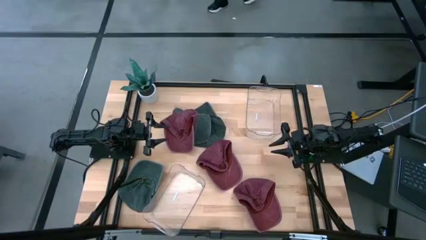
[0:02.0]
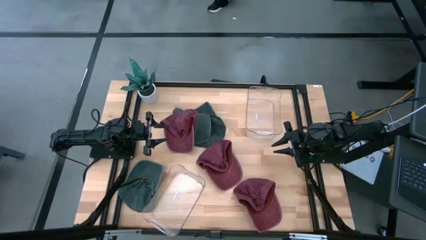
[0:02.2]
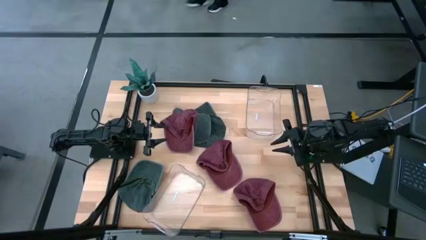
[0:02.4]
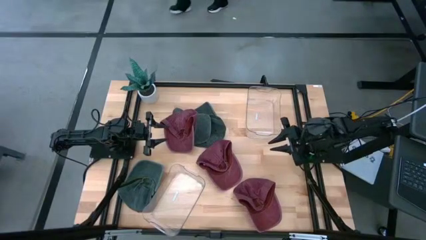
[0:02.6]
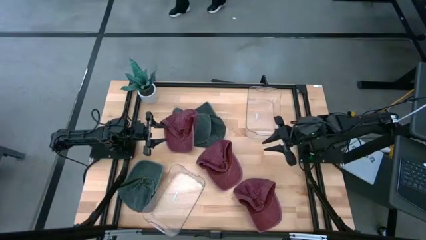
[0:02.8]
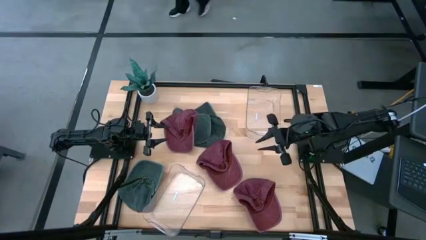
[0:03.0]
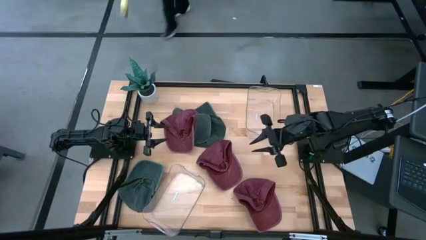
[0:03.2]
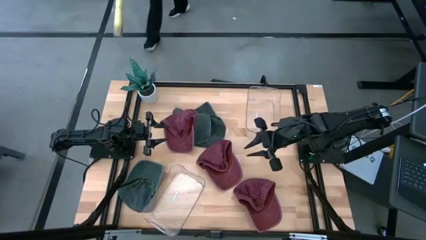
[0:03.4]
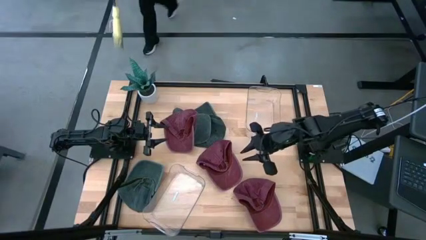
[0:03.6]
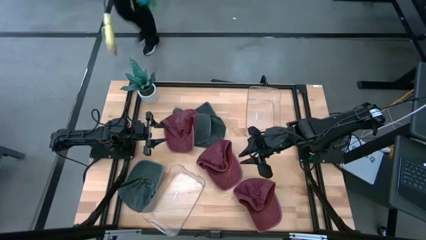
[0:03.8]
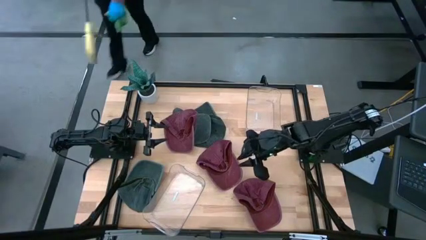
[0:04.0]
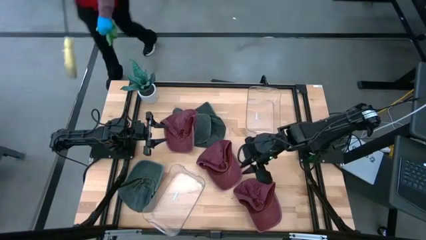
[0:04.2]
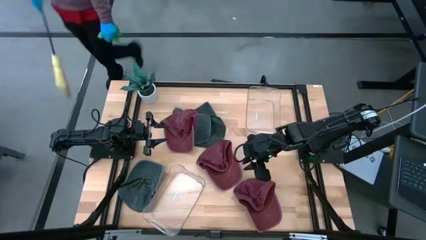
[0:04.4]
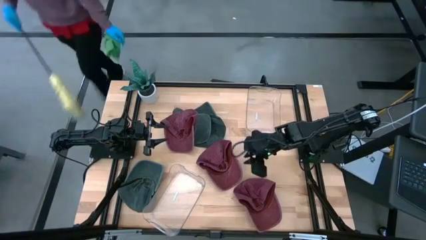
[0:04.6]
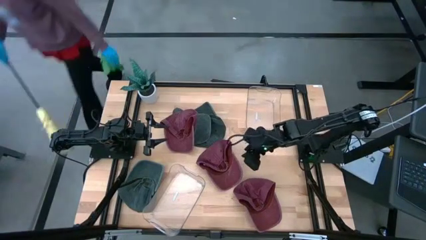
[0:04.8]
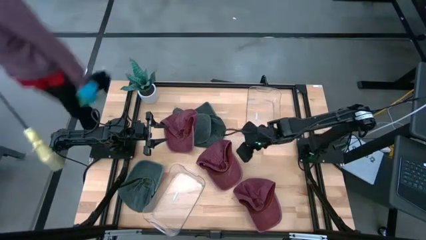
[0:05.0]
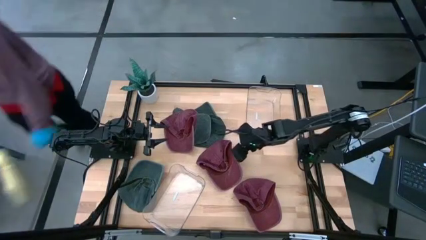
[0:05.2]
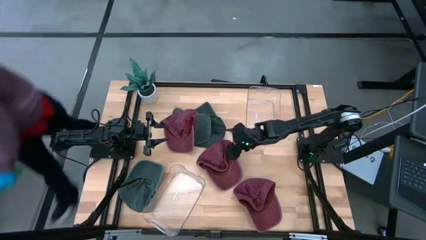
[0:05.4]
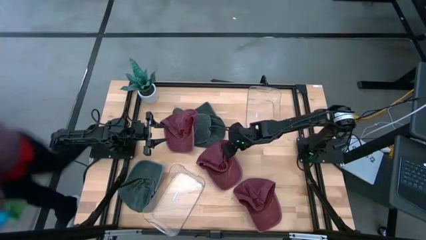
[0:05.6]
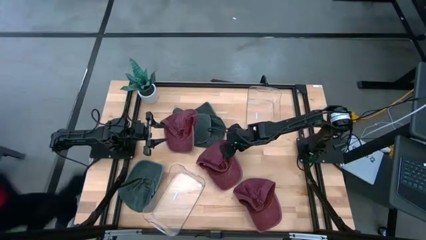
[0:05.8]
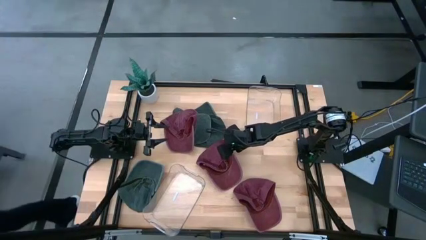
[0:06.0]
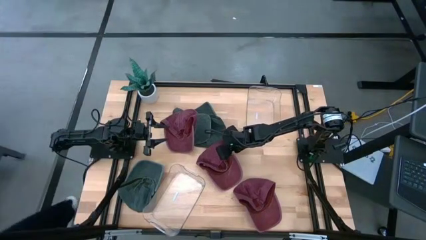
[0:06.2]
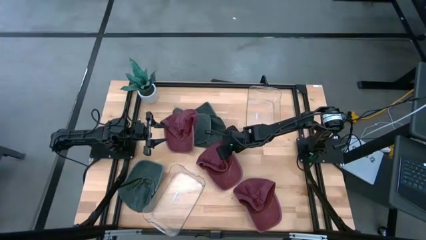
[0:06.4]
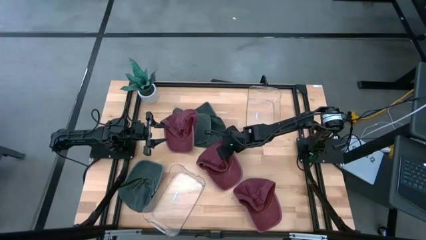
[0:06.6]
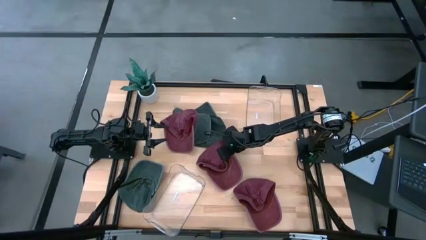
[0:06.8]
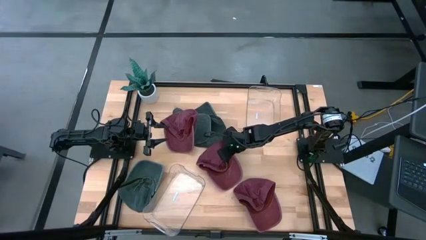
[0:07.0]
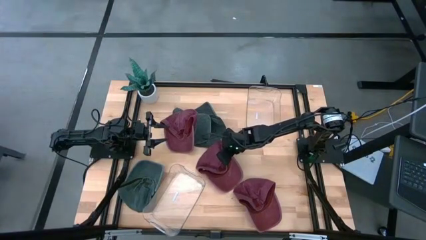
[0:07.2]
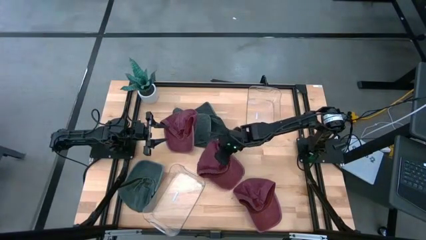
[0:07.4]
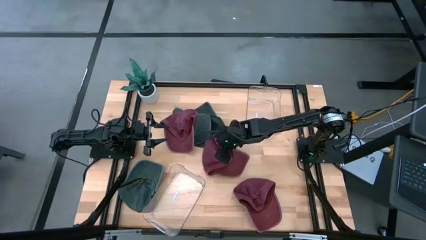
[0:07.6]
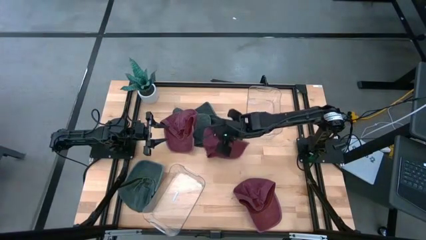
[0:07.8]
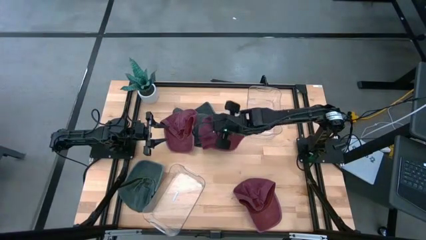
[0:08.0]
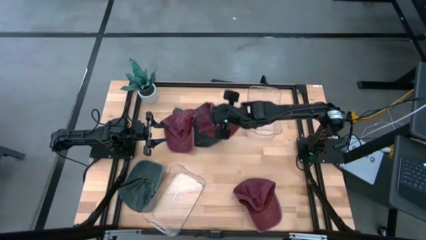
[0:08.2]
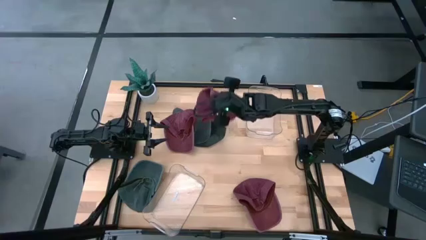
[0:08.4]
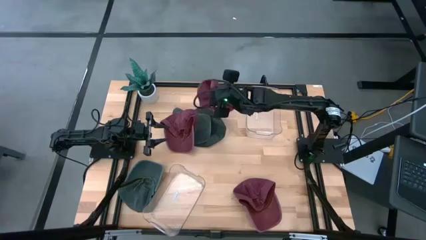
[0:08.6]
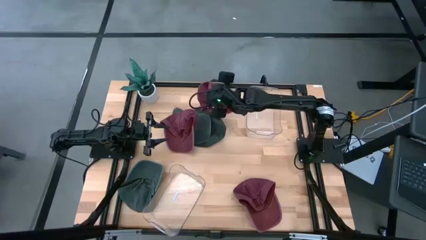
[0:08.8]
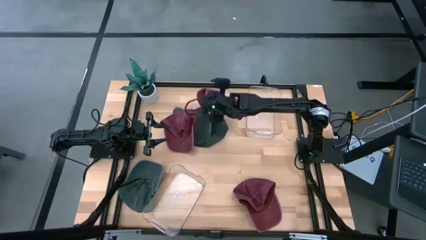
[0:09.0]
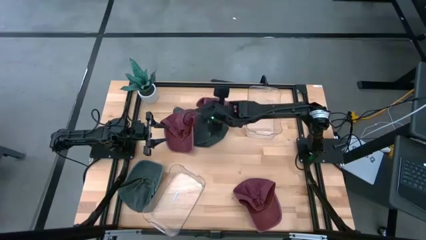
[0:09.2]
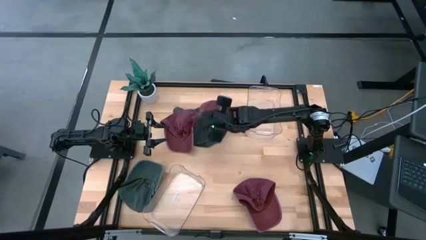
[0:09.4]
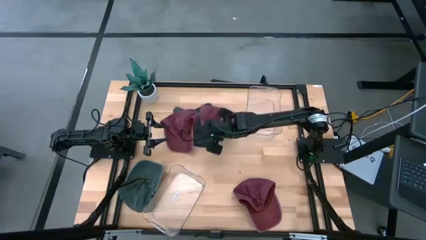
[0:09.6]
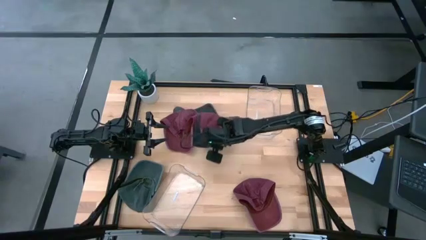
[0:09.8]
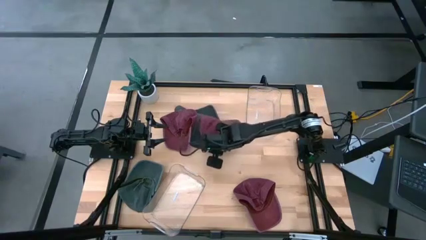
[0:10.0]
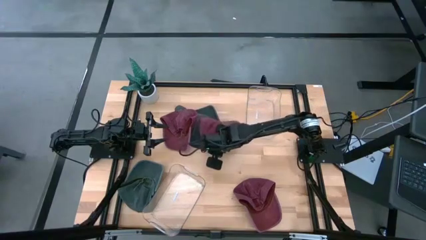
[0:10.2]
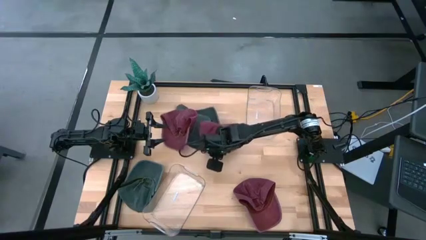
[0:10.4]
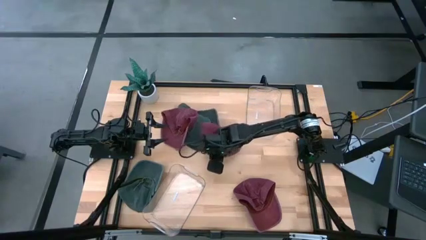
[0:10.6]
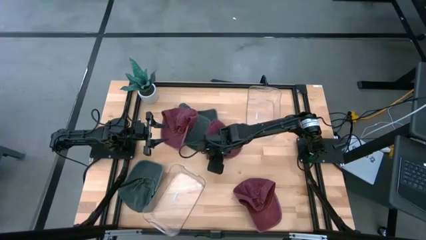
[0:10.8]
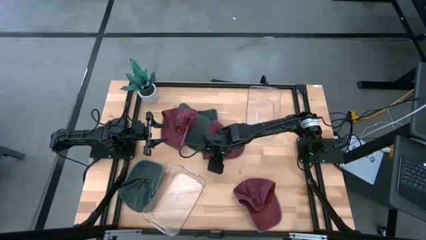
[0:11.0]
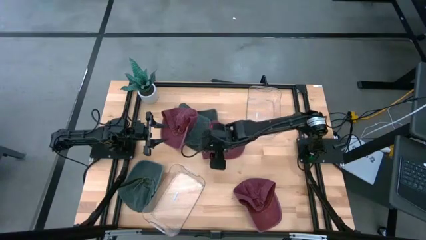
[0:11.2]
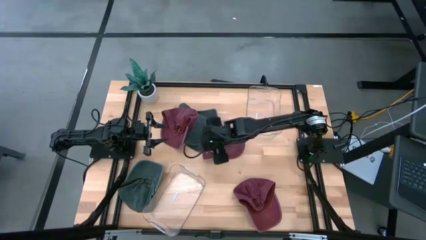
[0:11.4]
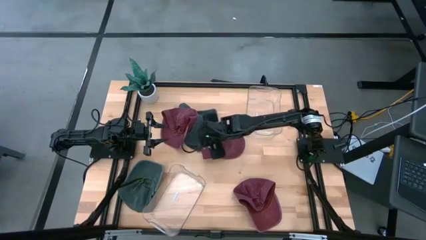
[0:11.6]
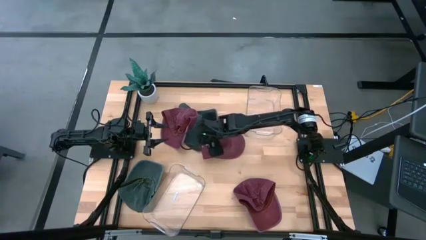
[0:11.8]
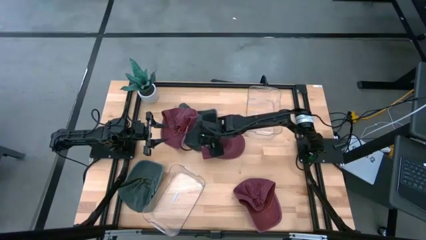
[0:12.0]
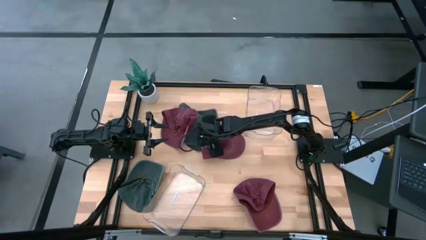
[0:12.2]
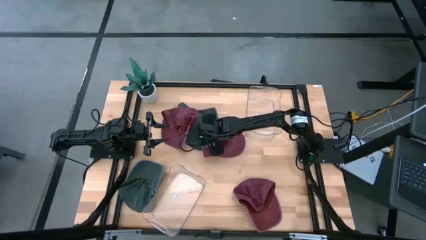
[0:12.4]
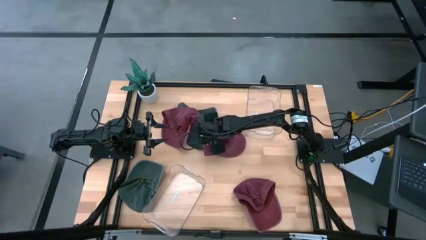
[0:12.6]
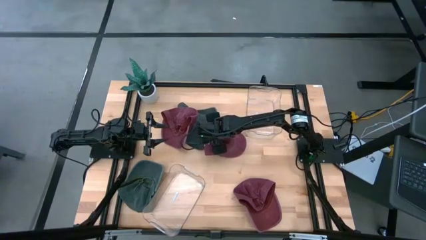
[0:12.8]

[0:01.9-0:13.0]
Task: Pick & Place hat
Put the middle red cap into the top transparent bin

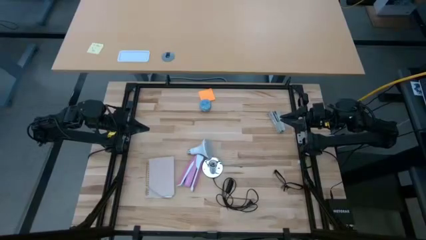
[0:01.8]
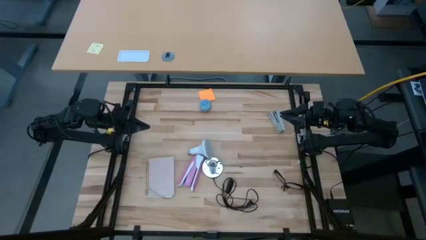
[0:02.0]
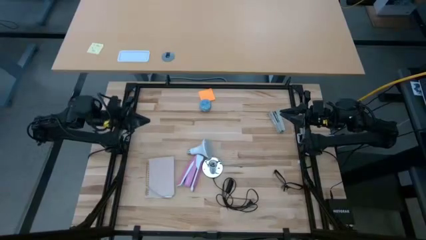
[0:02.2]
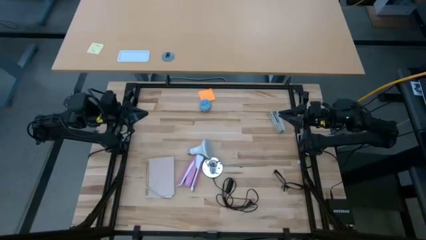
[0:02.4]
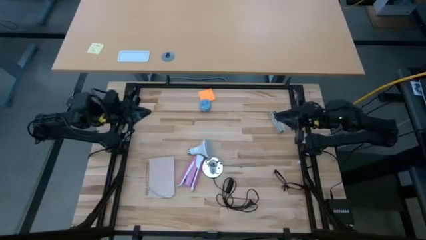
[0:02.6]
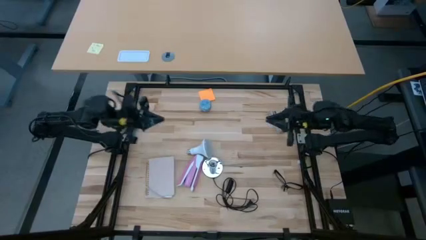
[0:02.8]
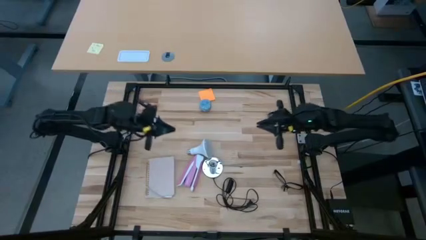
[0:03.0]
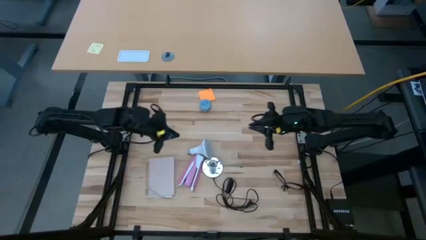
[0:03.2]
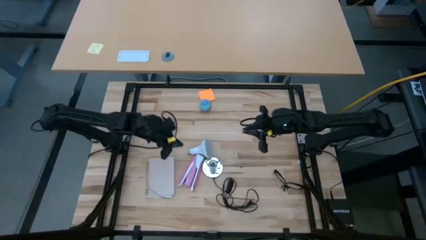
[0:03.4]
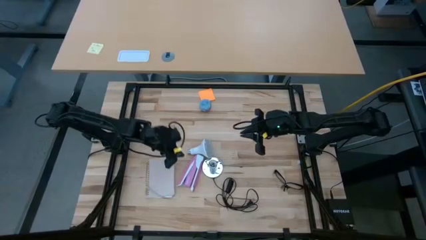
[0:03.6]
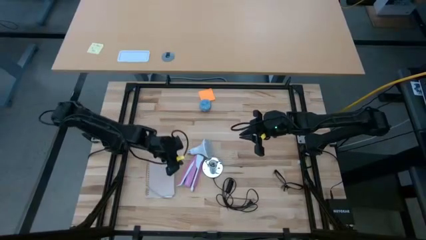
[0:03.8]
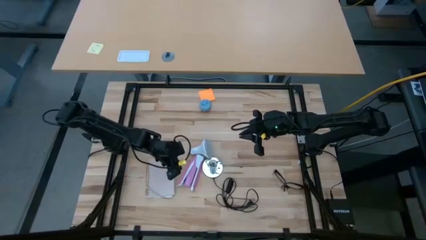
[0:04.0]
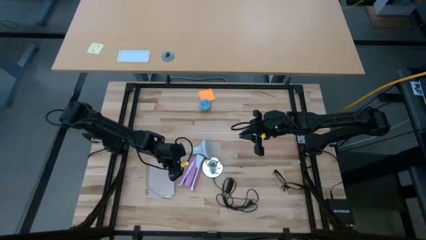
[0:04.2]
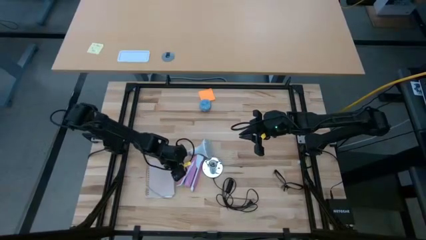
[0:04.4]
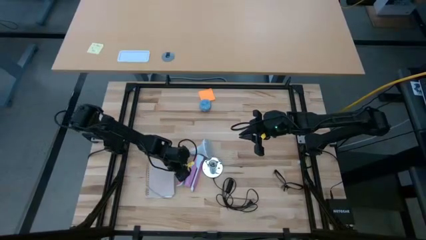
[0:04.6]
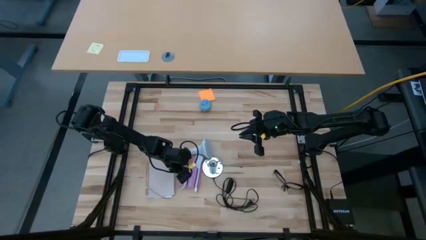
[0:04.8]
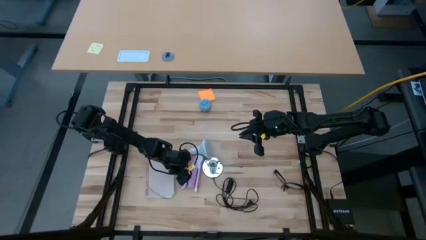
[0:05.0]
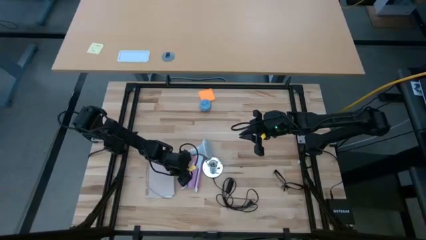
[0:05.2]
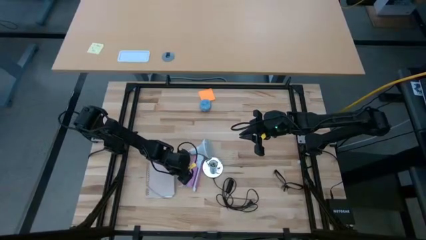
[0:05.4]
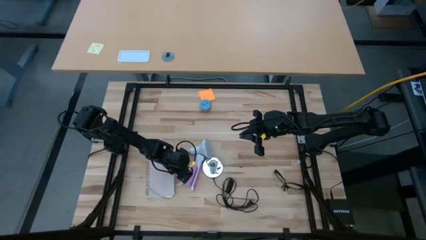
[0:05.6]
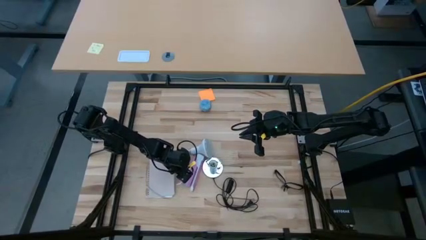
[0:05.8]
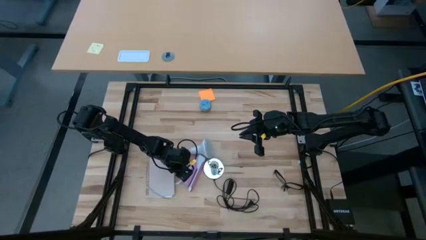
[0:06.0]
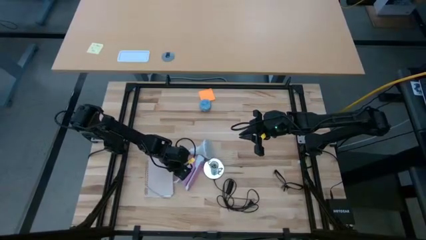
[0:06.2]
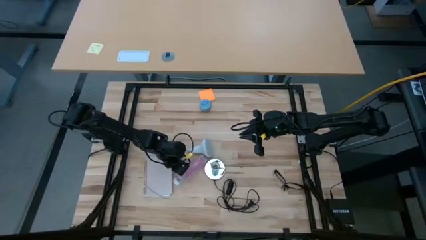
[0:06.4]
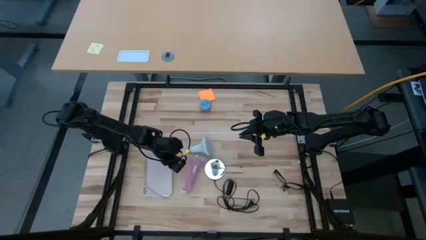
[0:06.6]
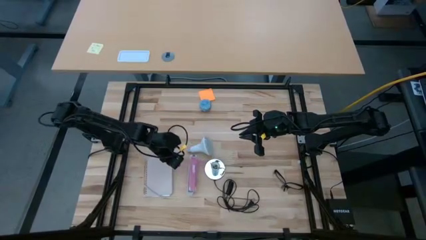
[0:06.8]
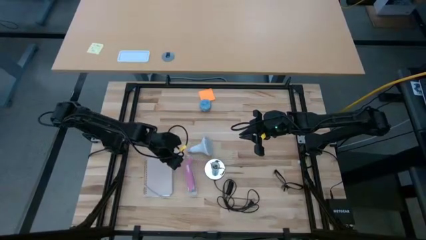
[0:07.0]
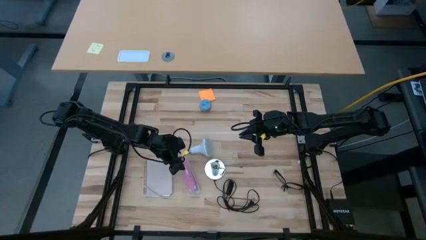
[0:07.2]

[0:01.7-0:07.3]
Task: Screw lightbulb
Move the pink stapler to the top left of the table
